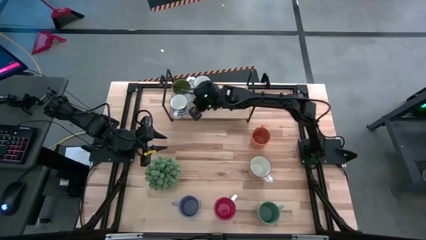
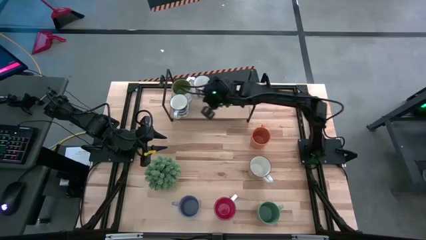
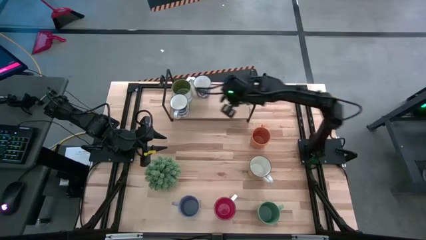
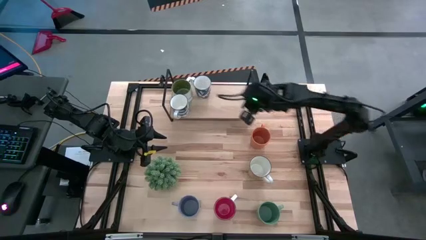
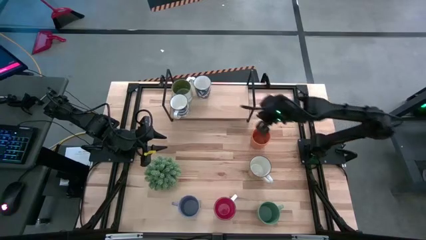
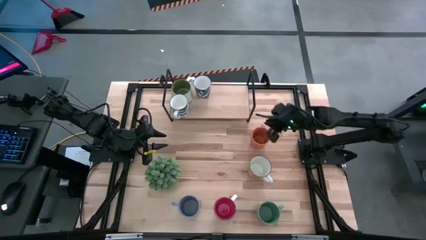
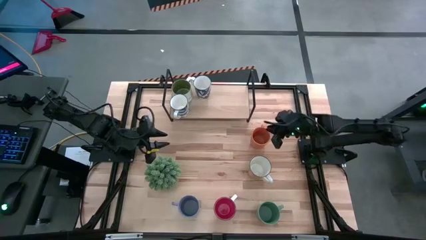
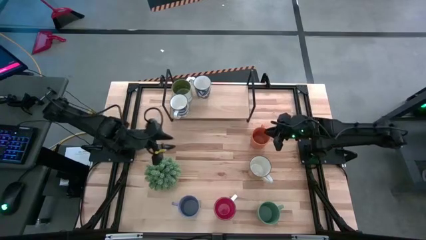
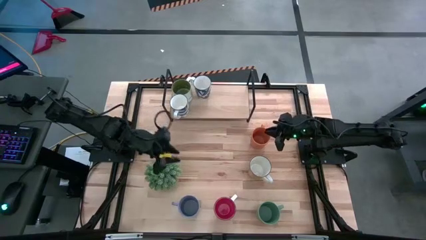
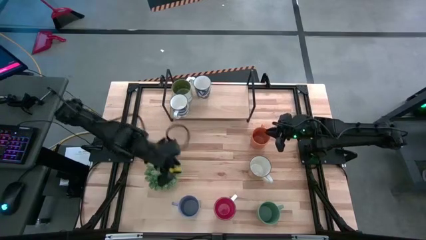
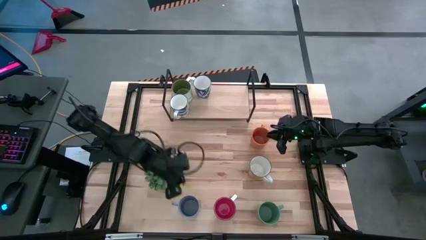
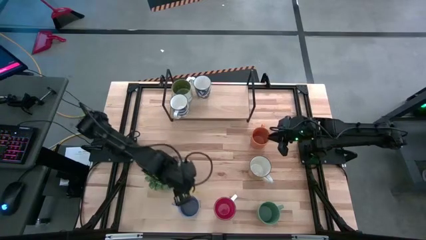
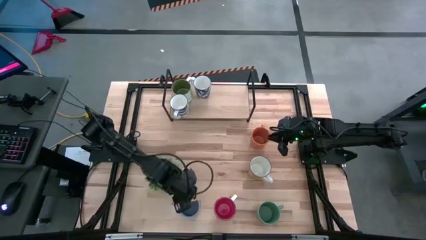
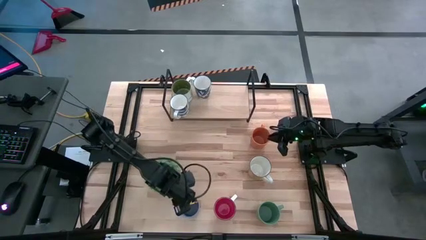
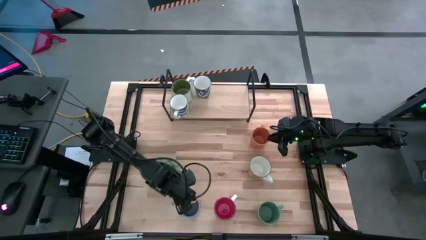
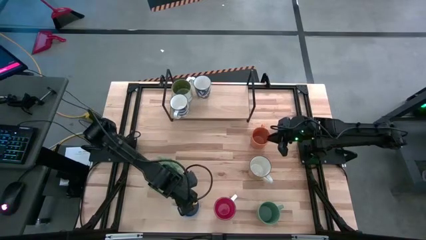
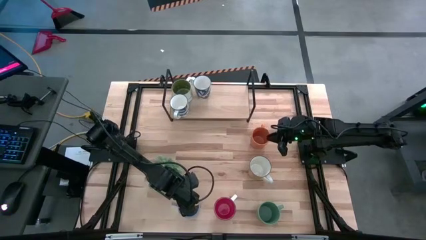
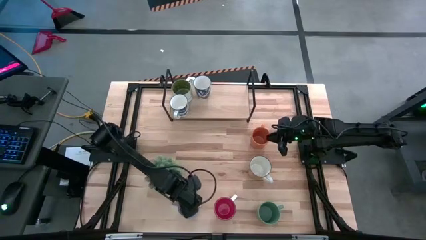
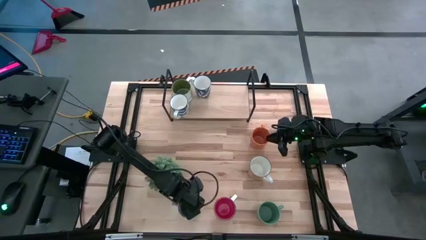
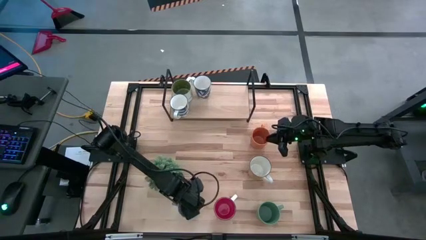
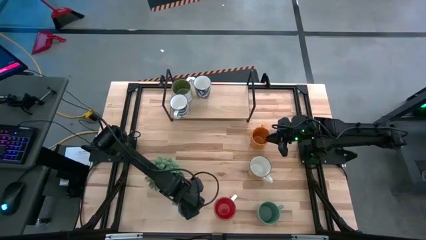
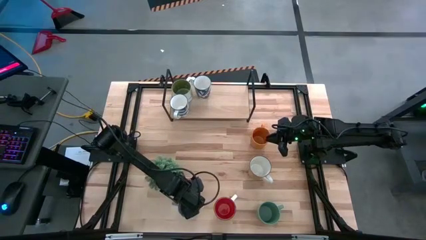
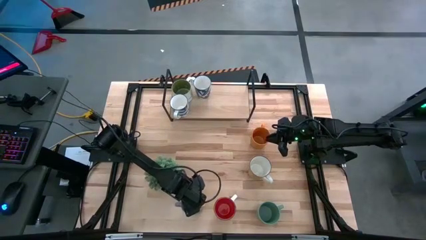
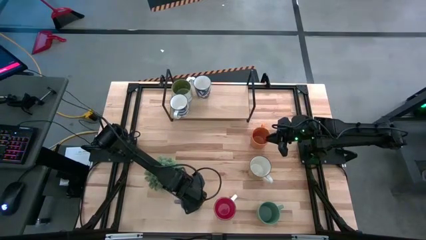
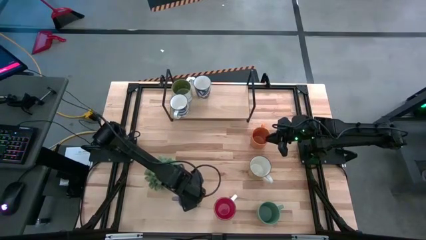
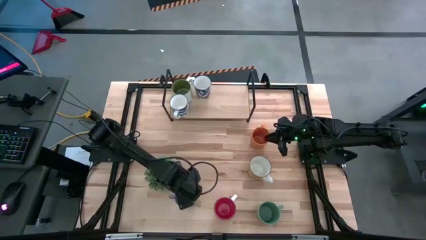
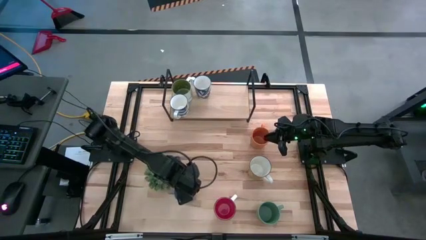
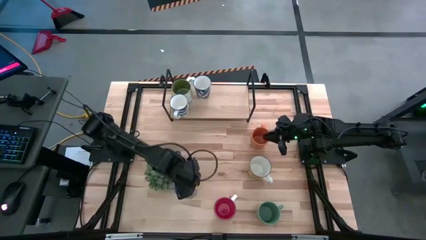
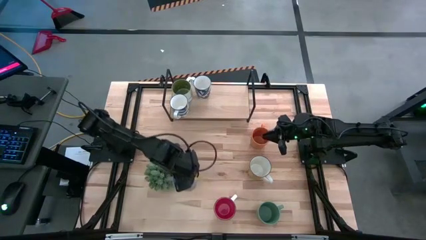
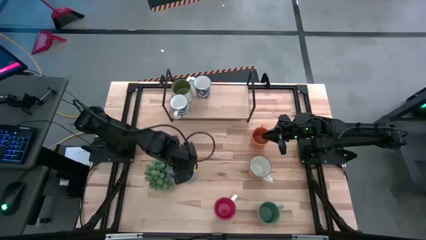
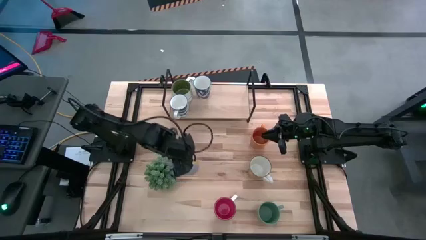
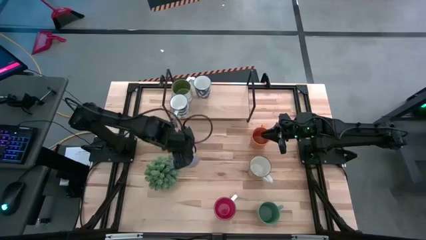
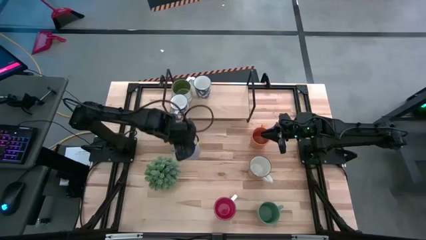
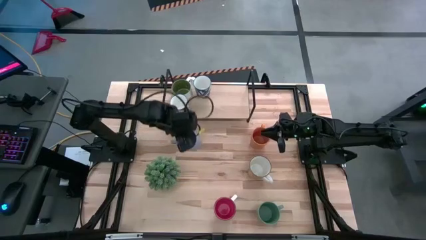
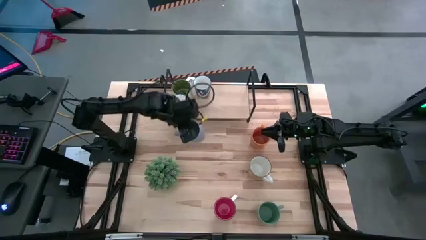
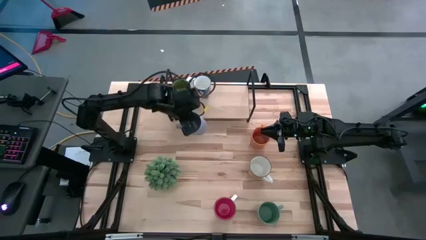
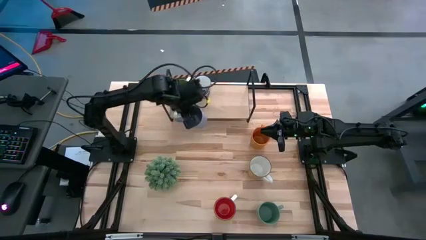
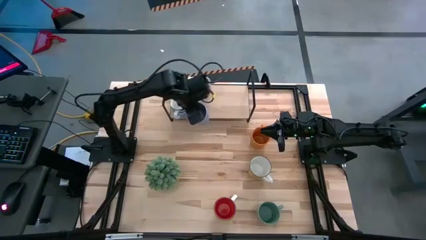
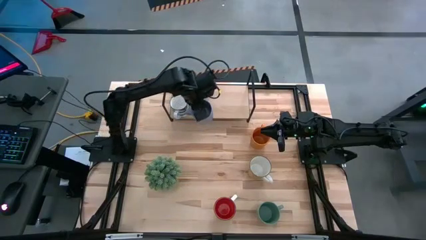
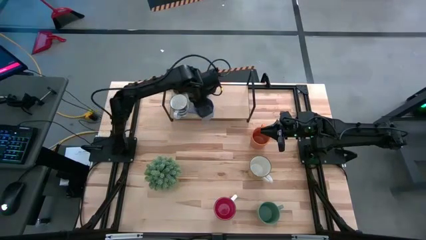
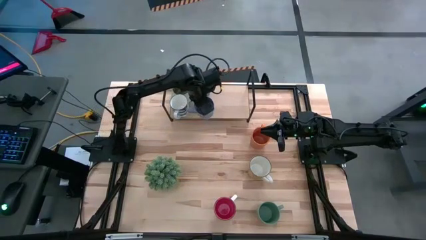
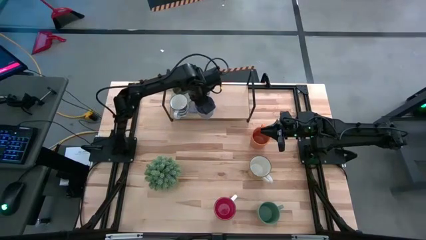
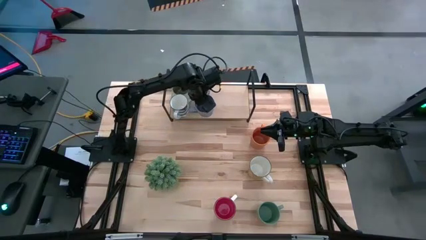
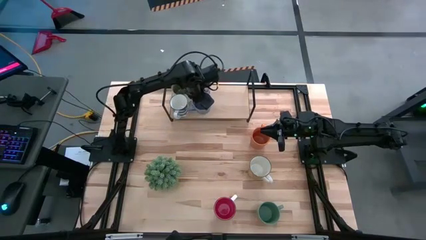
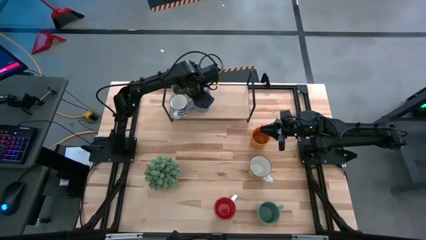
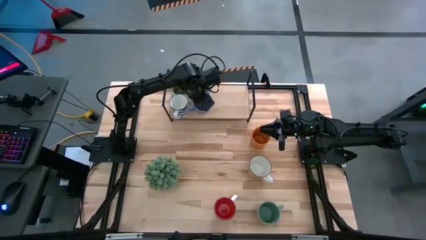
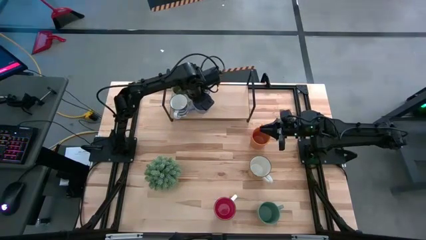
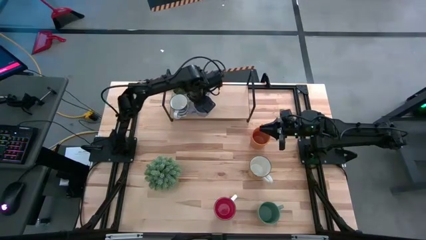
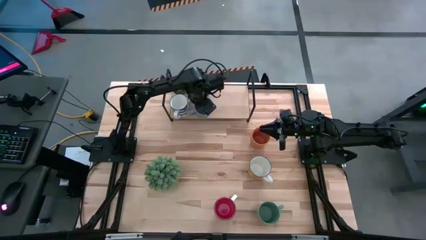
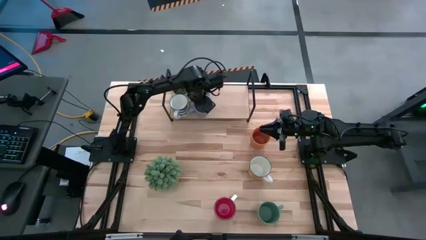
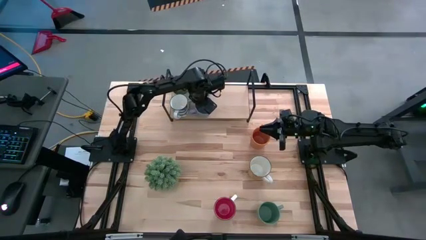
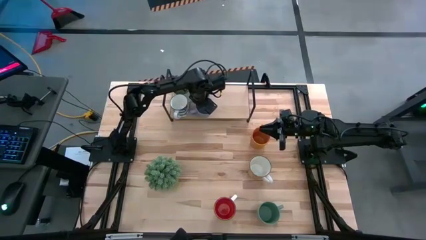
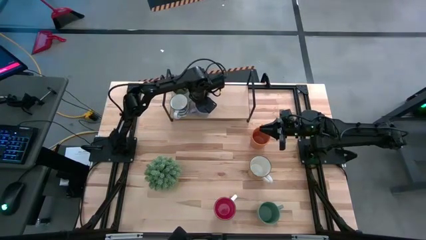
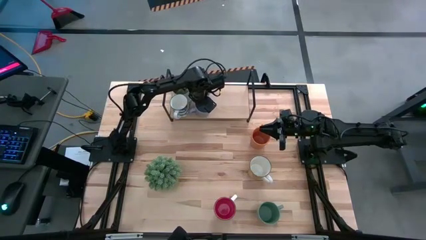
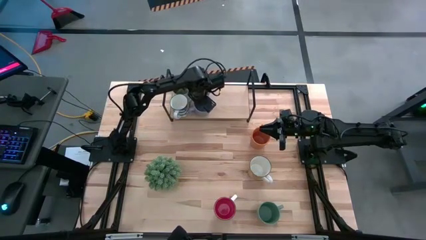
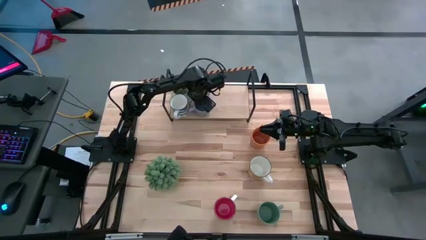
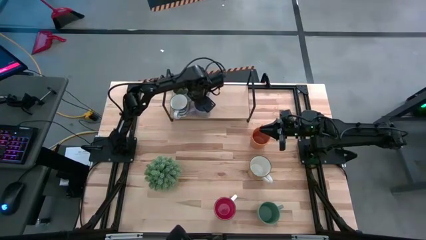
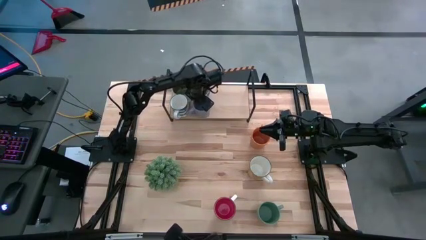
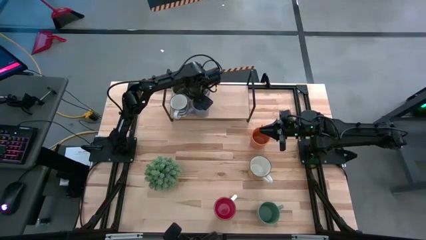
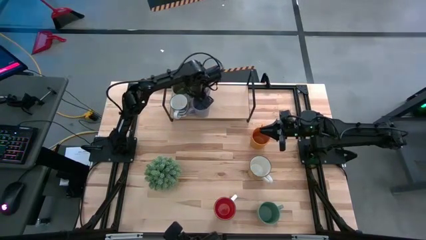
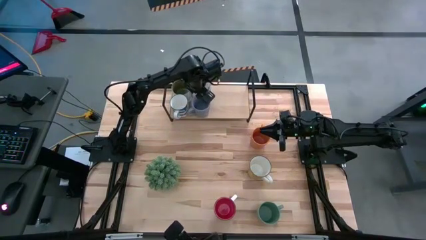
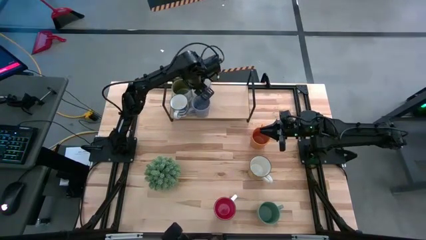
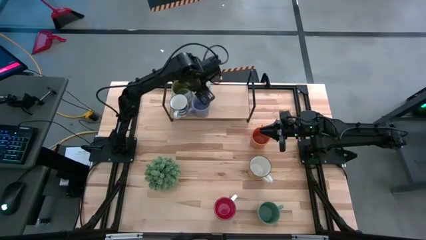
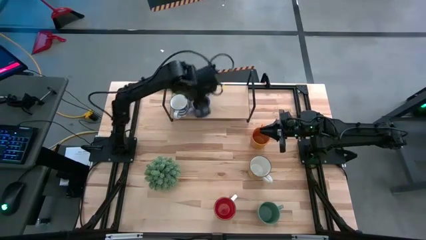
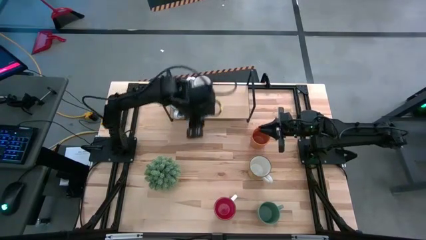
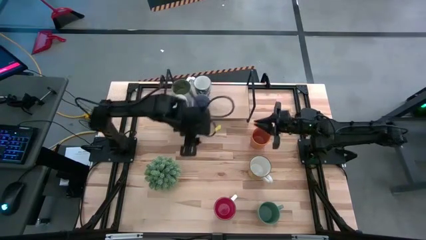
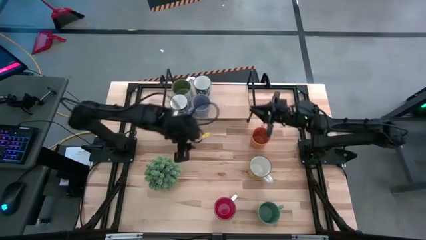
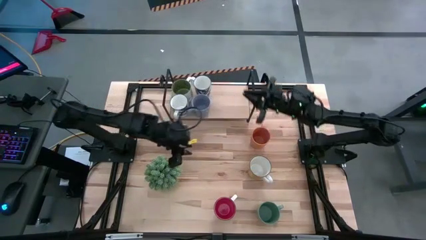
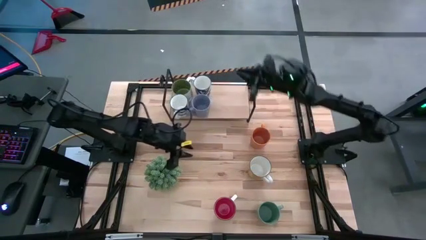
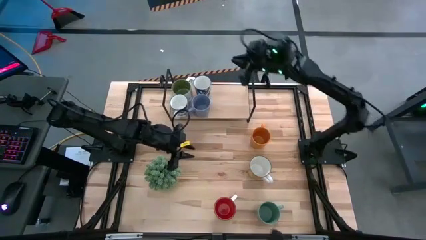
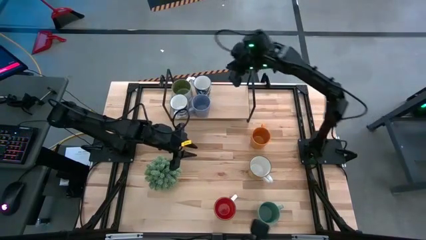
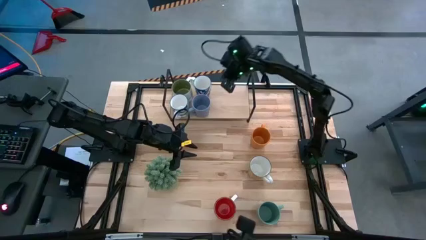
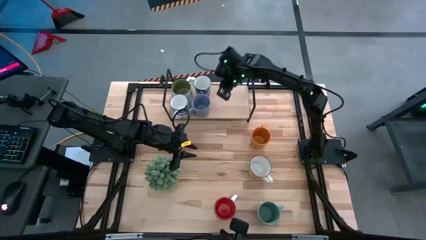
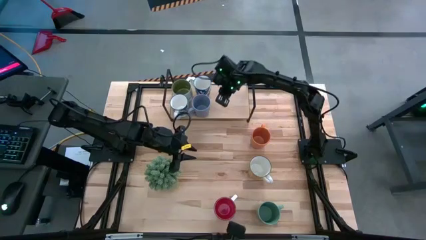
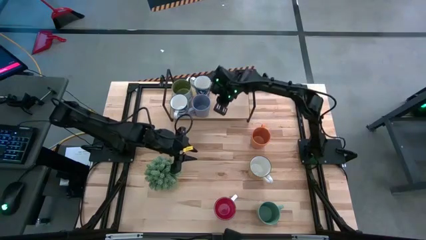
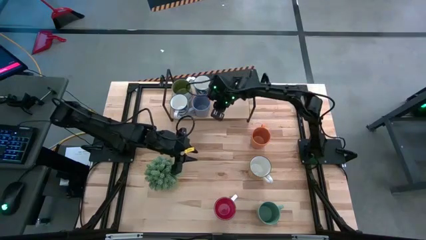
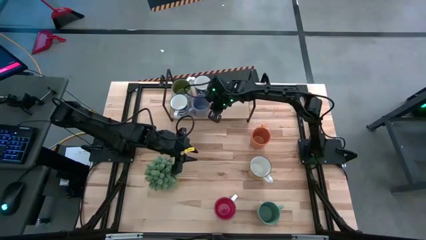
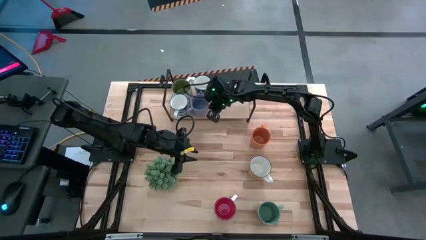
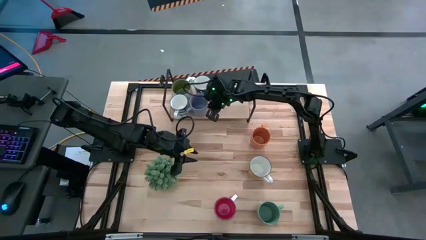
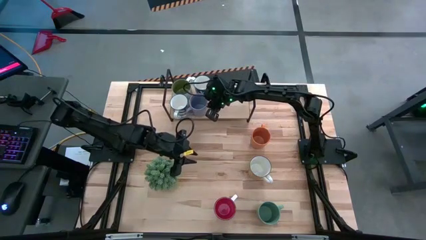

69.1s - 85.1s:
Task: Place coffee mugs
Put the light purple mug on the shelf aligned with the other white mug

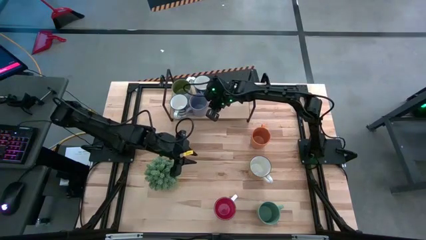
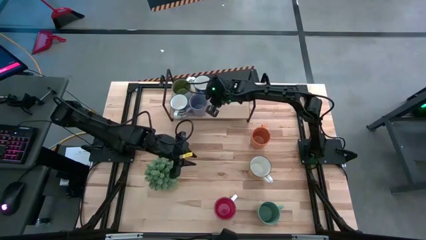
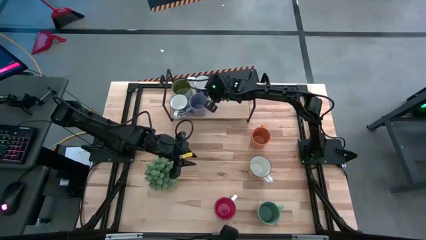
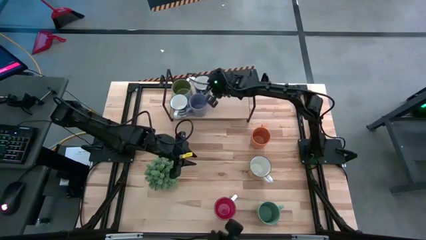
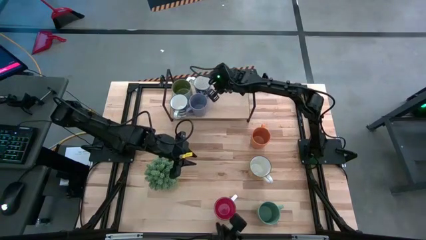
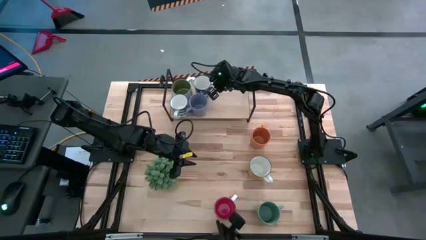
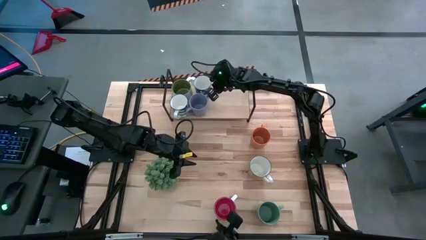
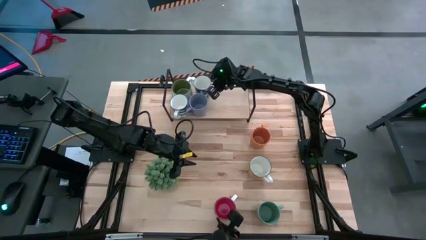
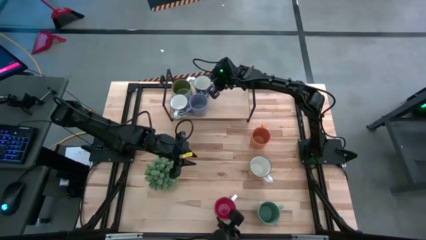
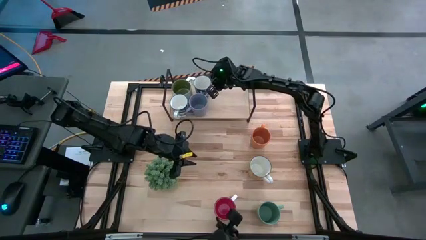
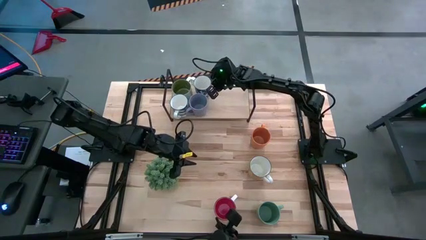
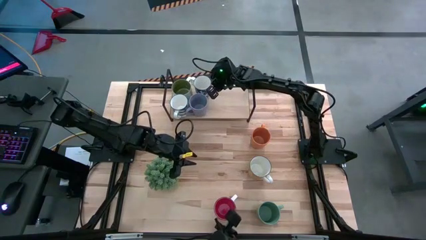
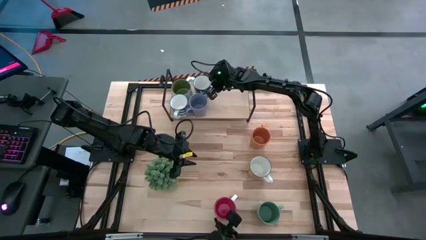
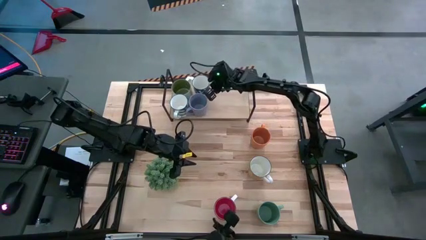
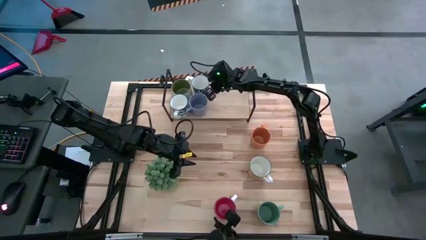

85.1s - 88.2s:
Adjust the blue mug on the shelf
